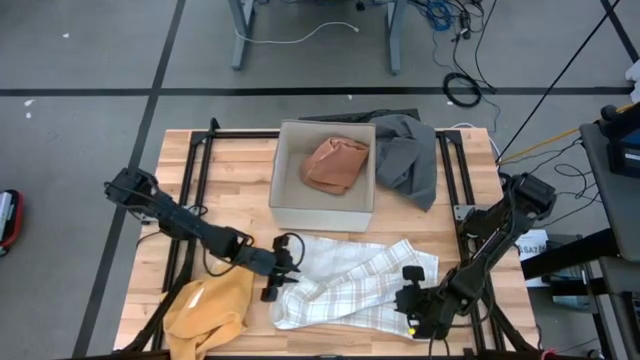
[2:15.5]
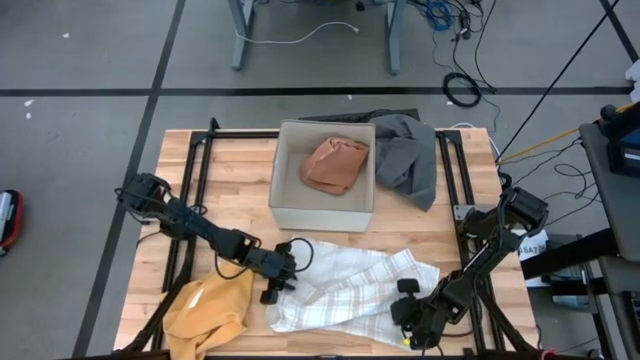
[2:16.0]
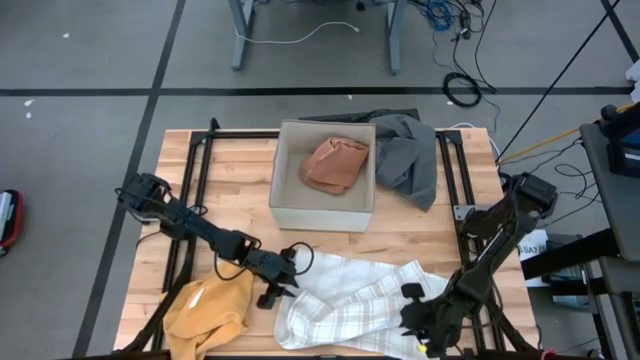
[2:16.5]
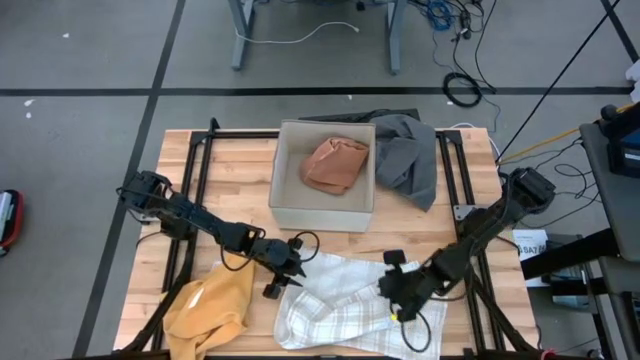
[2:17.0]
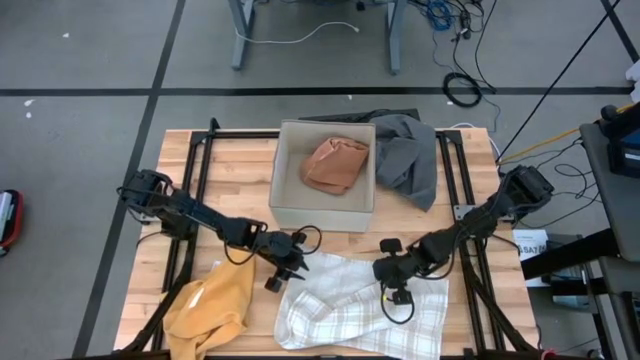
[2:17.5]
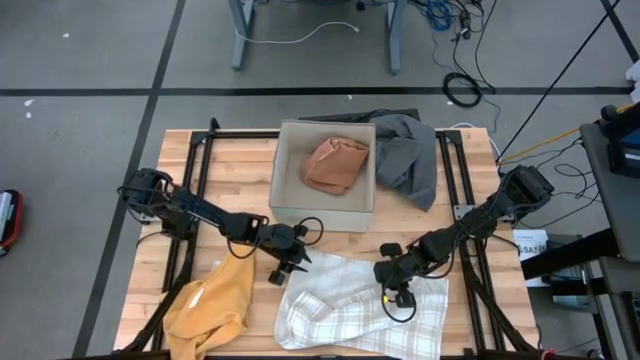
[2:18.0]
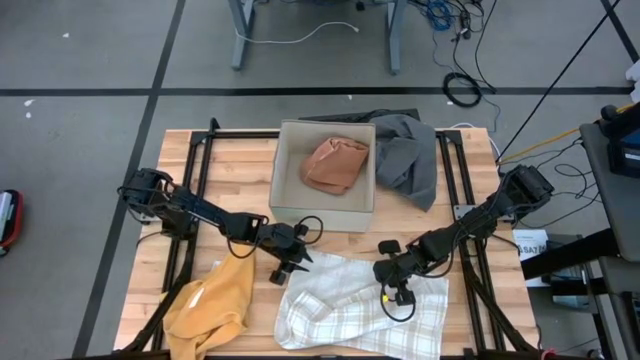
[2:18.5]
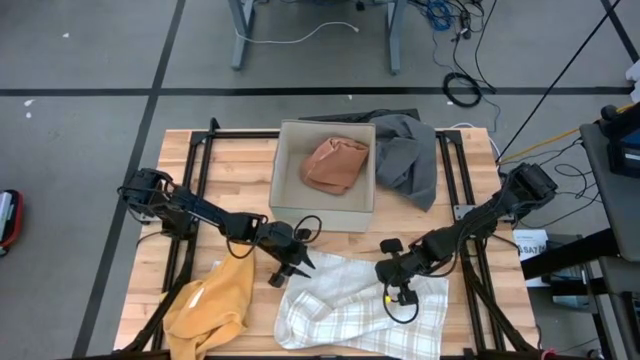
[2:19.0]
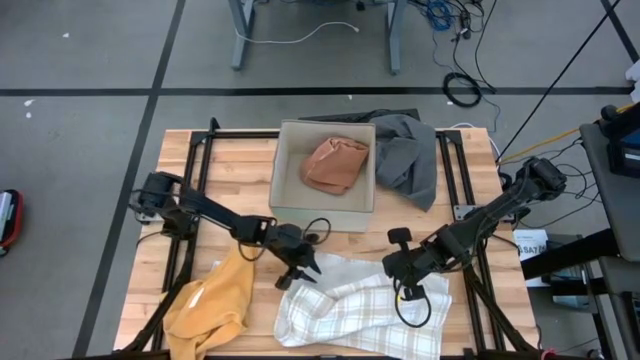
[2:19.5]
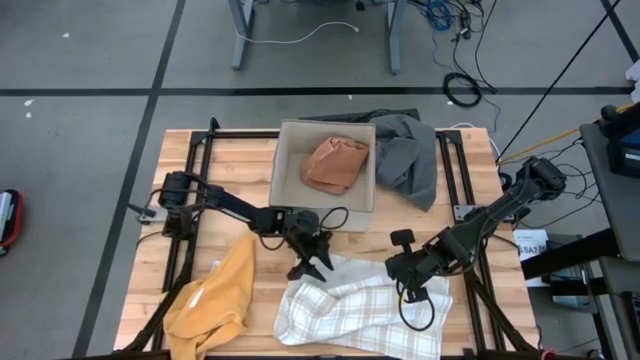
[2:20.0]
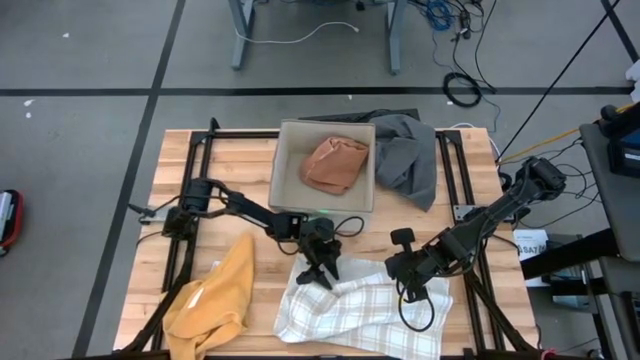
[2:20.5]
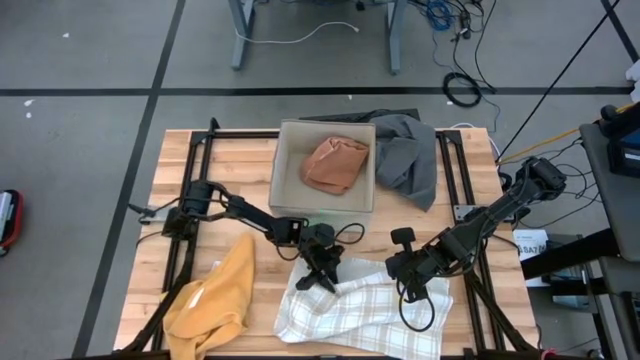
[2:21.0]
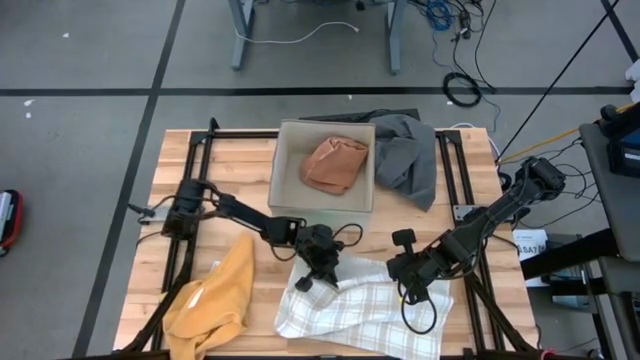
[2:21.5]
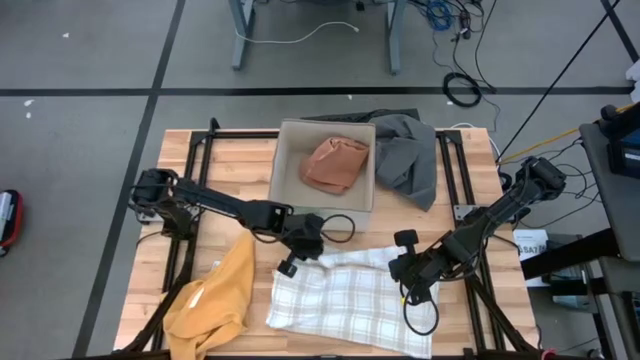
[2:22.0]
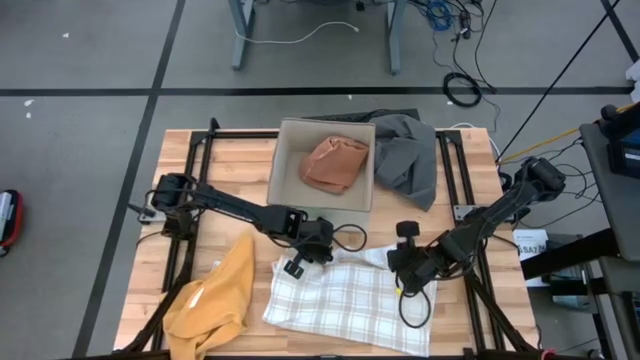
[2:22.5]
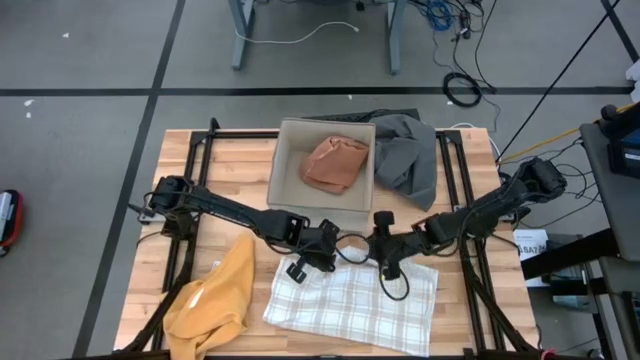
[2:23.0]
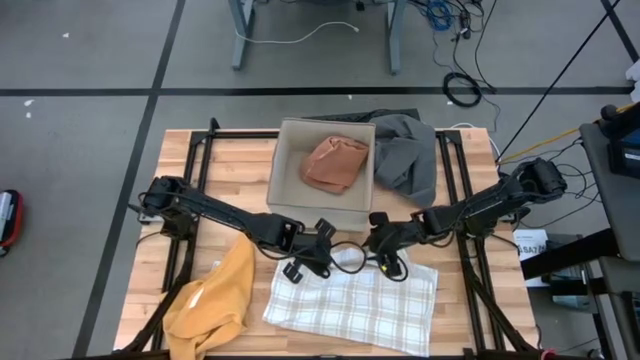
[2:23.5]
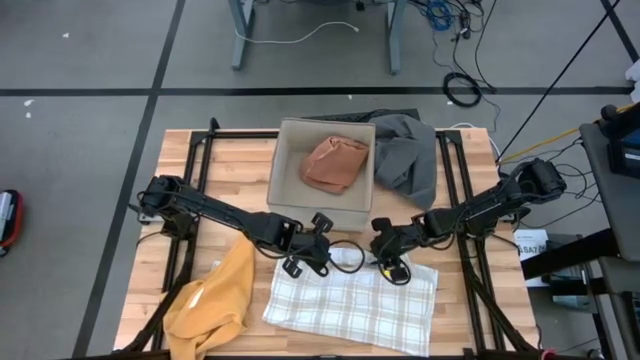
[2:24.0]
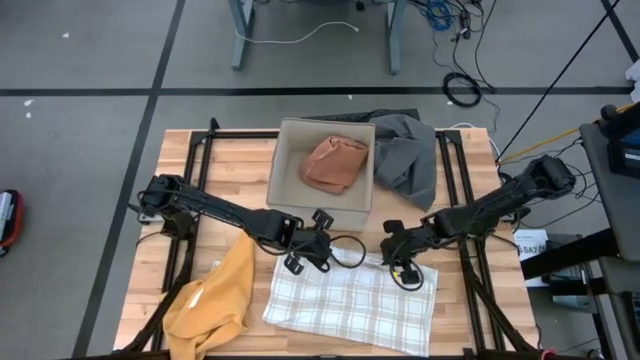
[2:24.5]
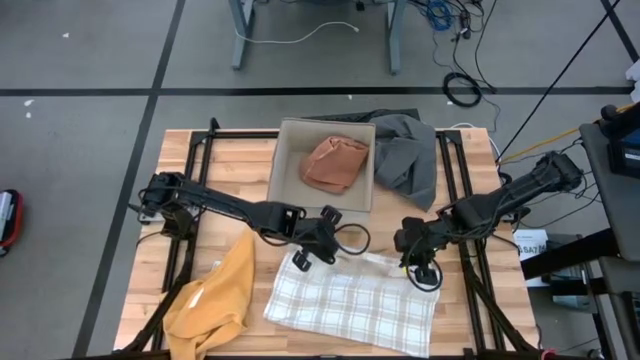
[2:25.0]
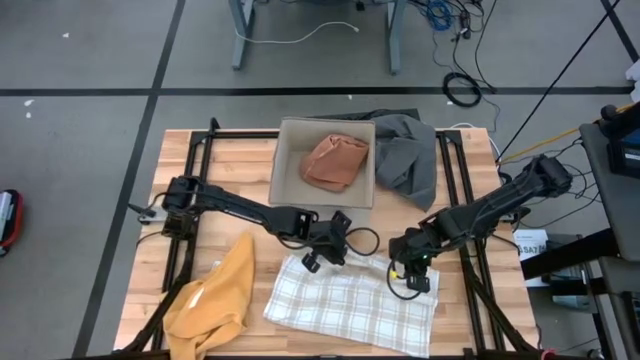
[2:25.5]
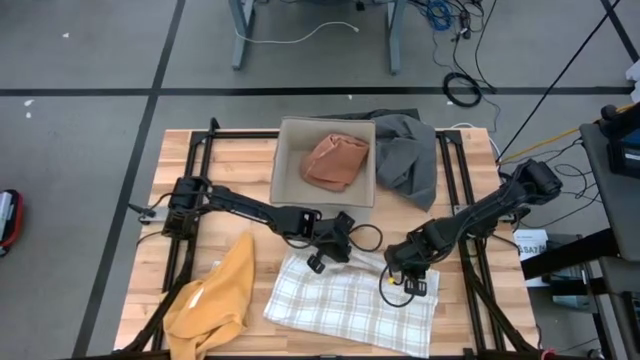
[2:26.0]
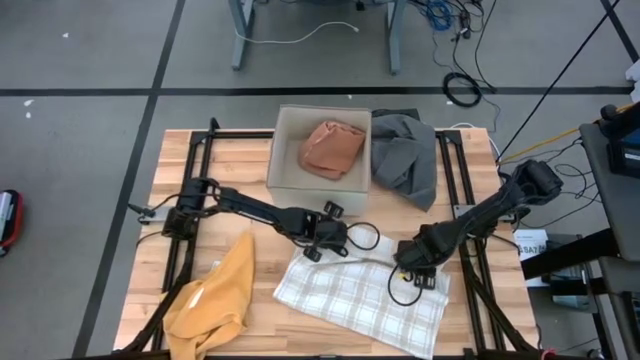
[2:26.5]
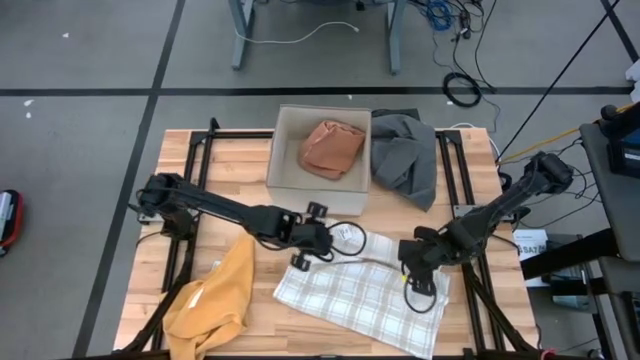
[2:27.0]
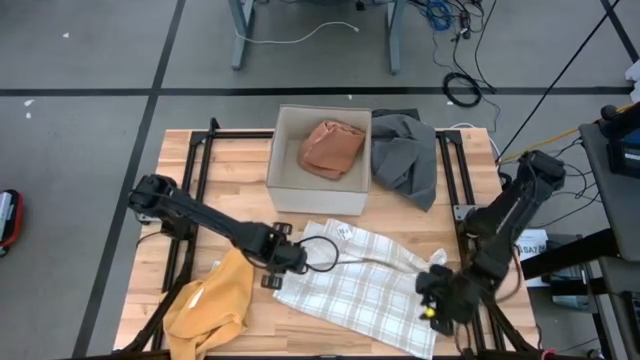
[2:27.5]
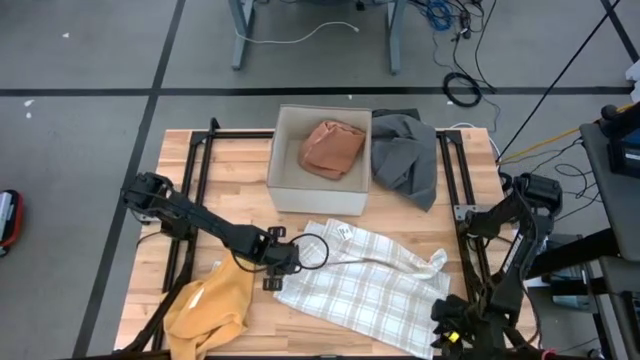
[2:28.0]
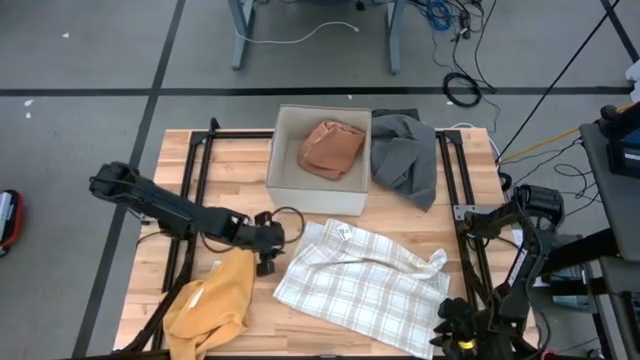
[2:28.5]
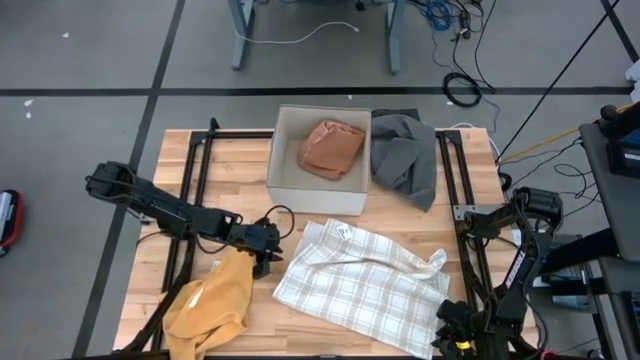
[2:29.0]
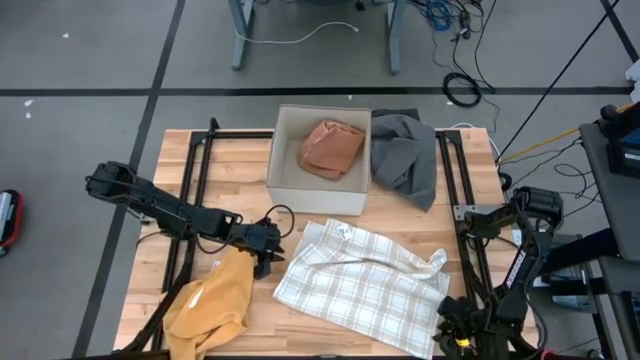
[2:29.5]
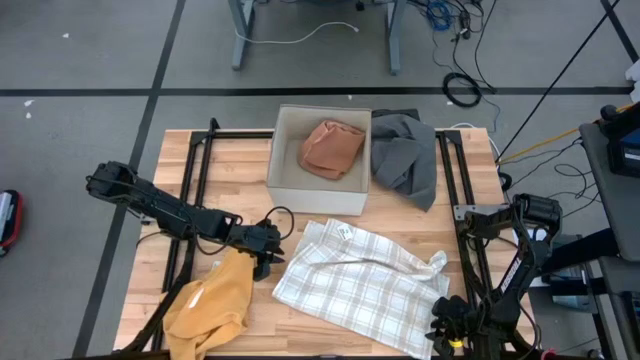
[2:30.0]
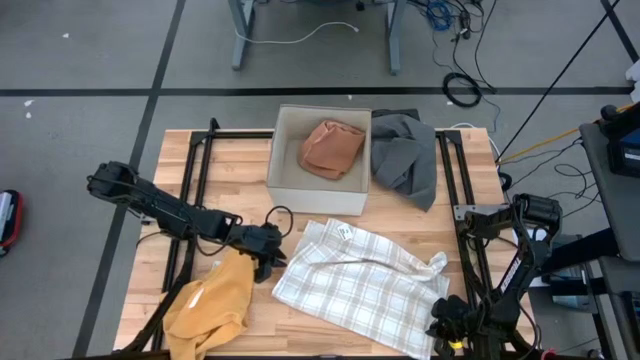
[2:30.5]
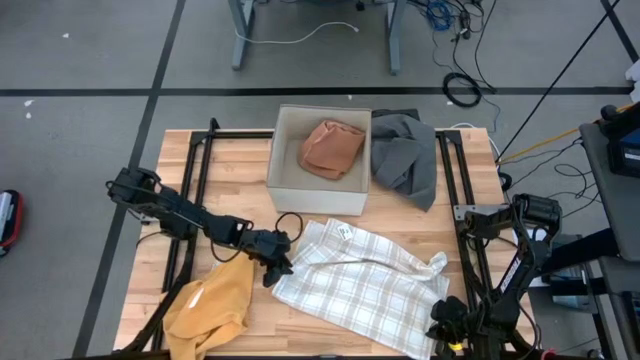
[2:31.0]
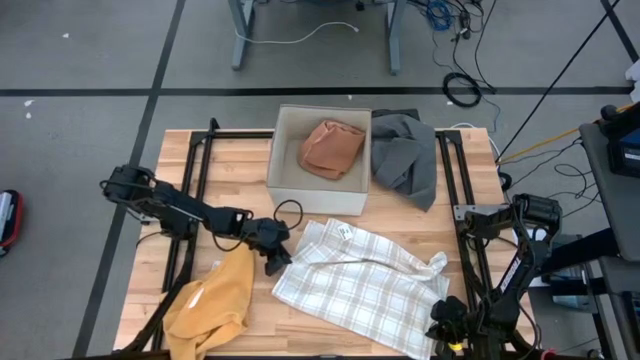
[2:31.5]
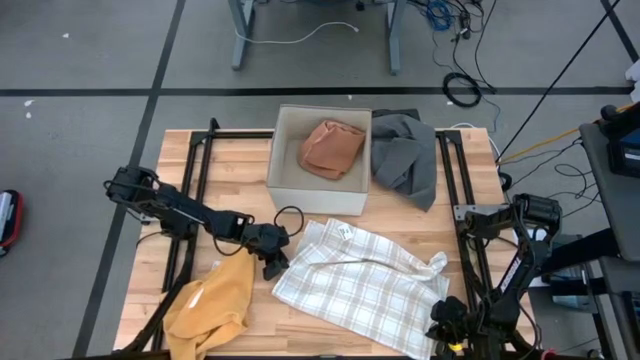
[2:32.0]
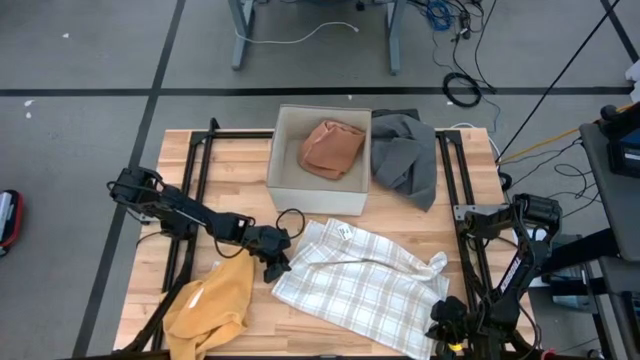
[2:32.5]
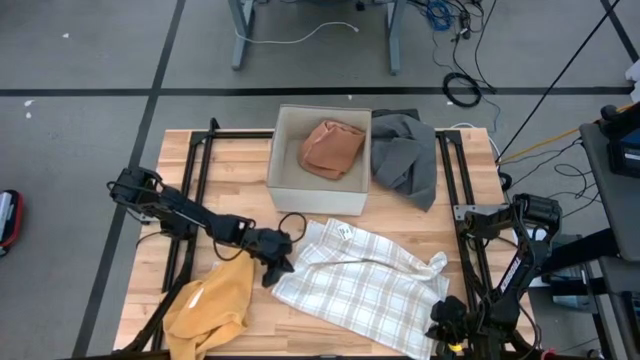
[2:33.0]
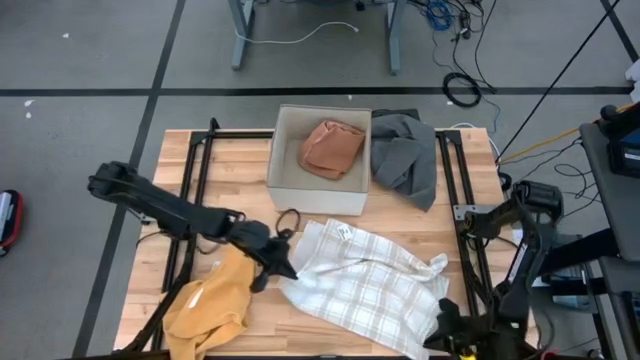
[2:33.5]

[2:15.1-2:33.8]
Task: Fold towel
Fold the white towel
